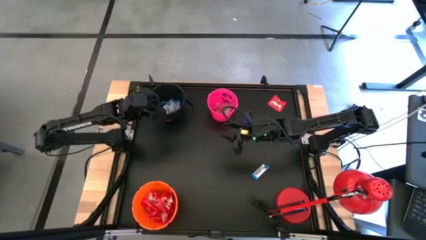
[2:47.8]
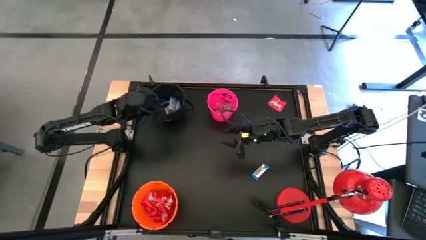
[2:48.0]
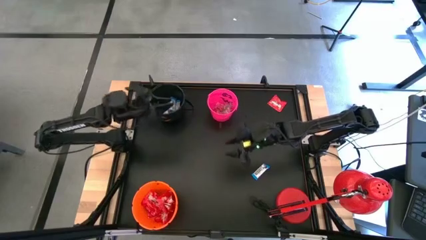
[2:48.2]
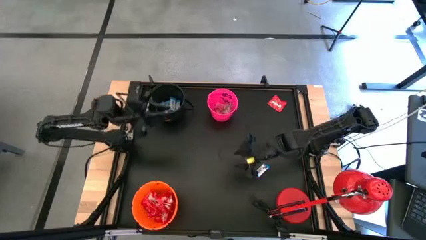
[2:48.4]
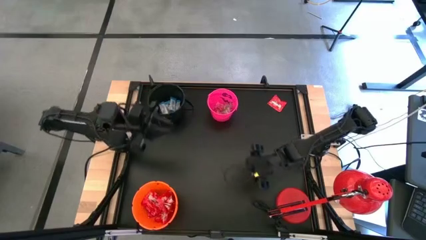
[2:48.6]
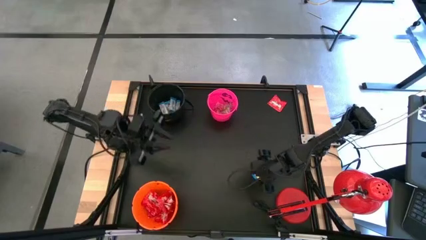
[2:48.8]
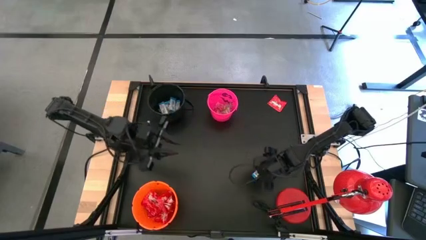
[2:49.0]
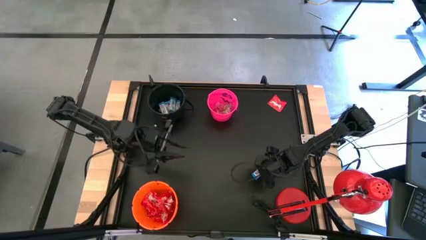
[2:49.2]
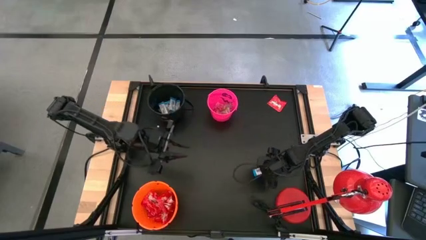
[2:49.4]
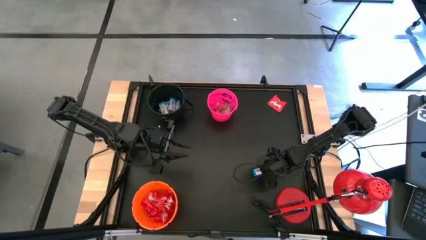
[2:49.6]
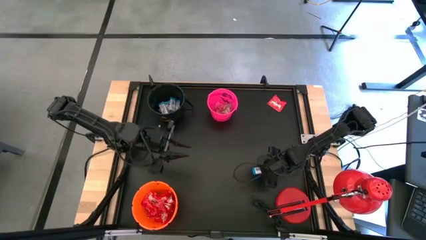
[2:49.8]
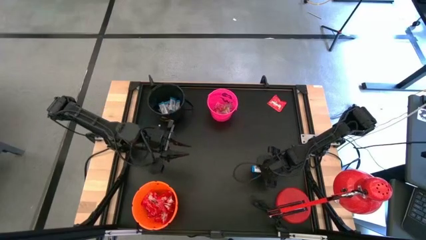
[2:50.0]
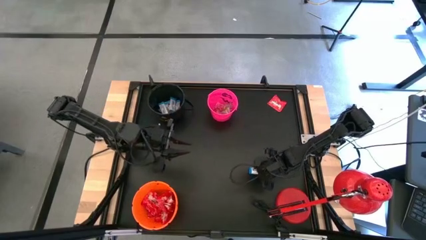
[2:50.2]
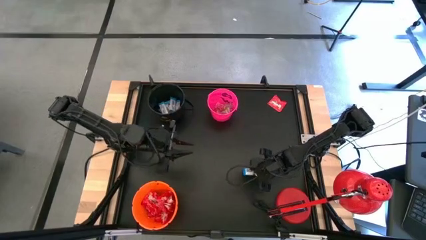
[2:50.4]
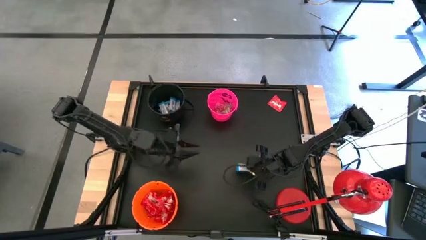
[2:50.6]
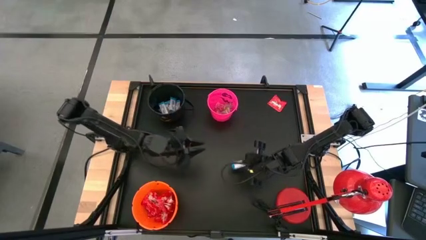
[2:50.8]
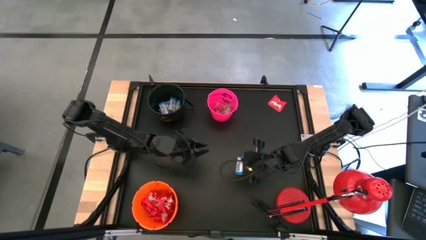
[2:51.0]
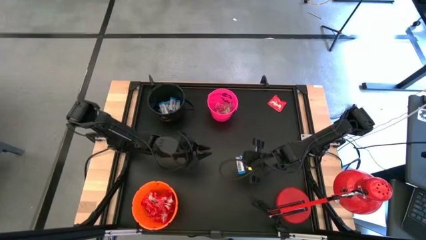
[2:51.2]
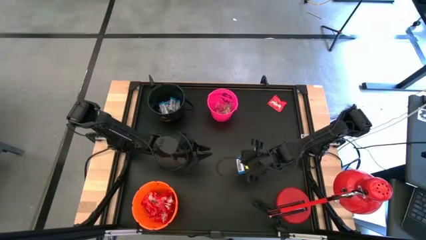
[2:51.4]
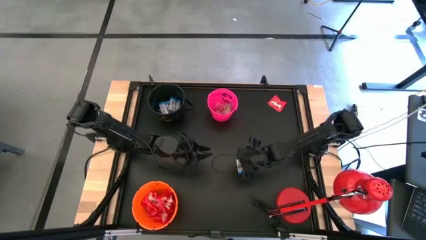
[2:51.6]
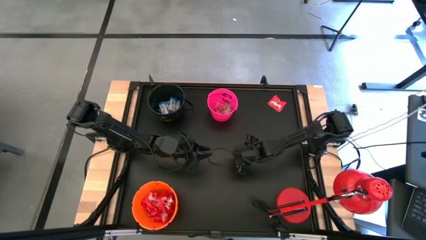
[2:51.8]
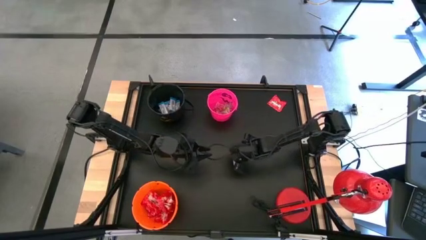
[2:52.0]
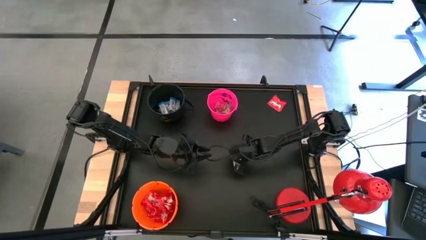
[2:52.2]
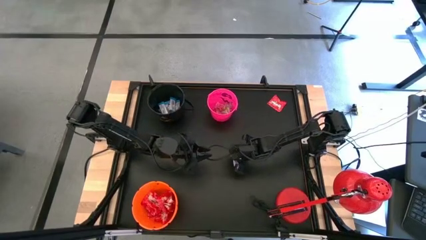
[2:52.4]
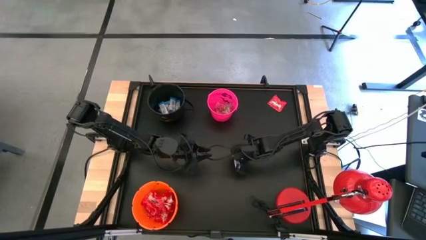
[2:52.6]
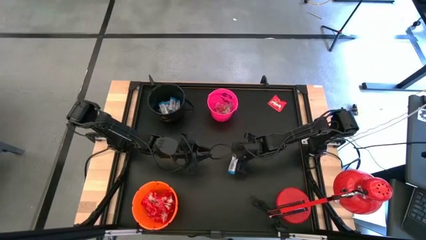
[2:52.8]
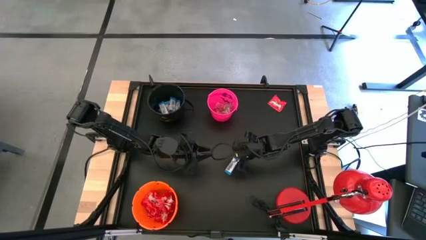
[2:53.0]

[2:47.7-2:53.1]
Task: Organize candy in baskets
Put the white chocolate bar into the black bucket

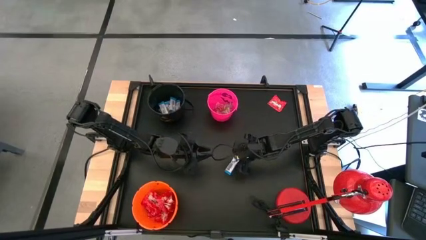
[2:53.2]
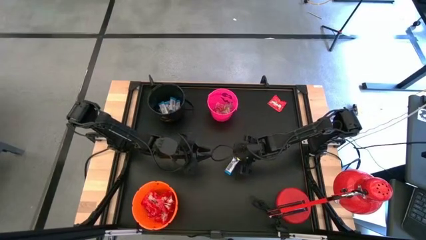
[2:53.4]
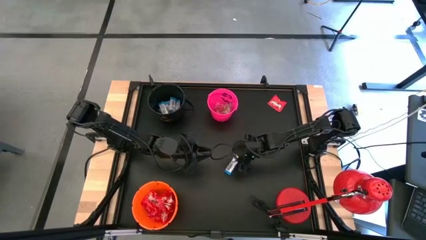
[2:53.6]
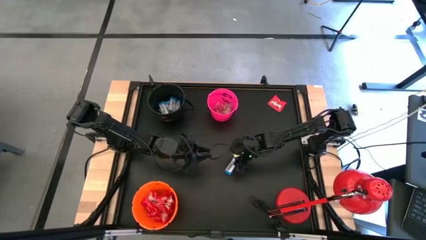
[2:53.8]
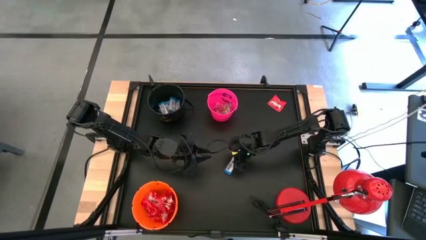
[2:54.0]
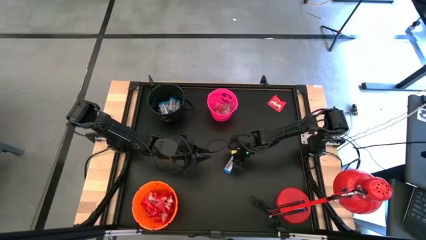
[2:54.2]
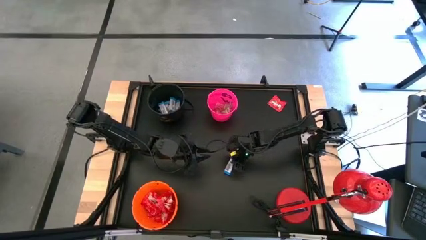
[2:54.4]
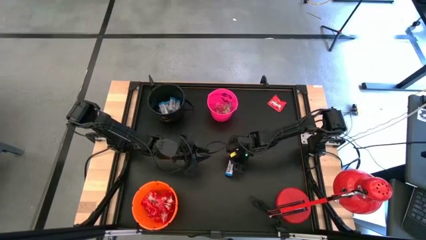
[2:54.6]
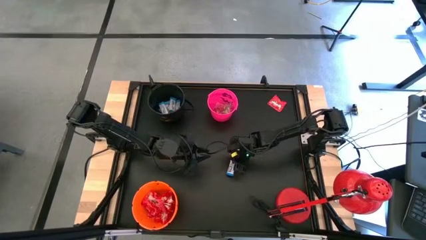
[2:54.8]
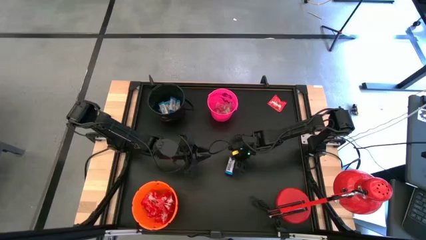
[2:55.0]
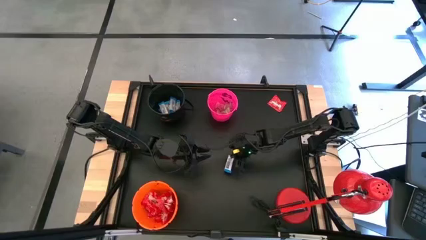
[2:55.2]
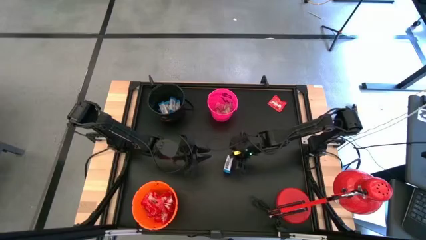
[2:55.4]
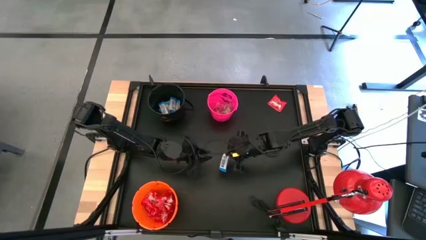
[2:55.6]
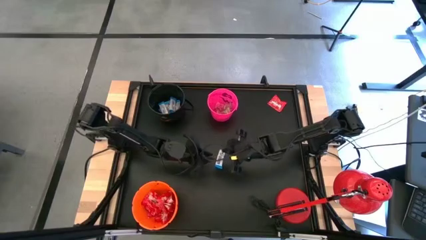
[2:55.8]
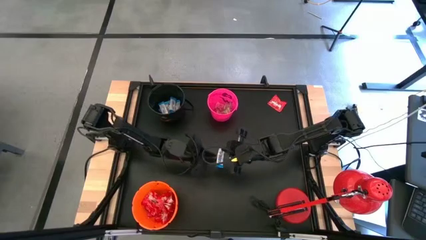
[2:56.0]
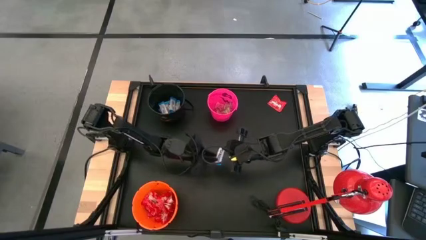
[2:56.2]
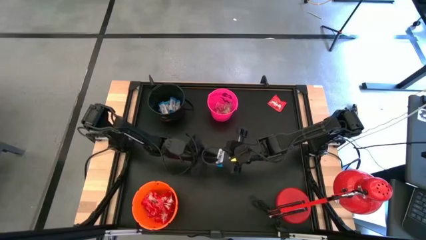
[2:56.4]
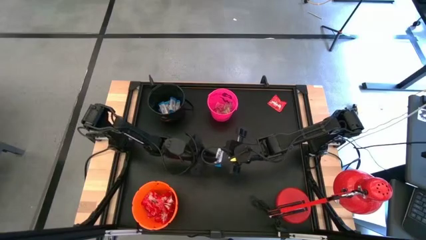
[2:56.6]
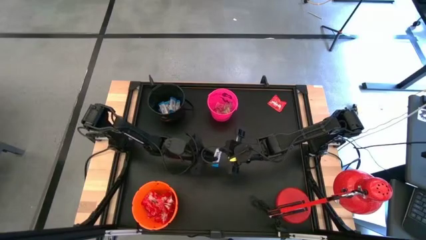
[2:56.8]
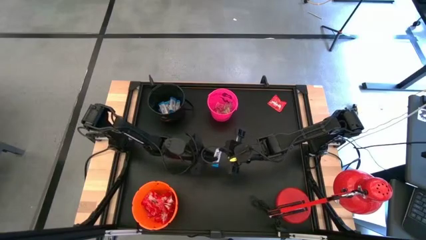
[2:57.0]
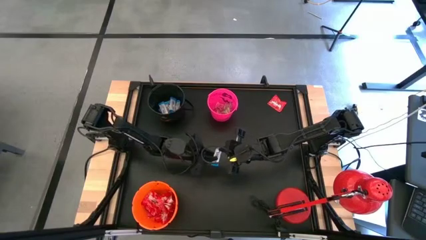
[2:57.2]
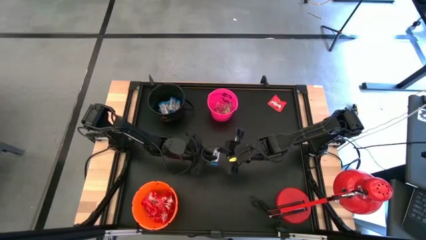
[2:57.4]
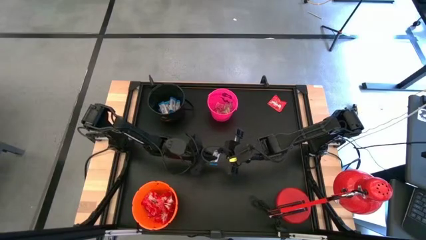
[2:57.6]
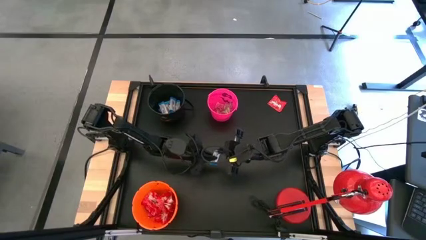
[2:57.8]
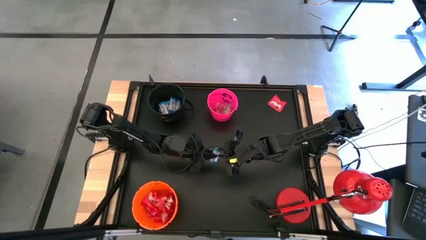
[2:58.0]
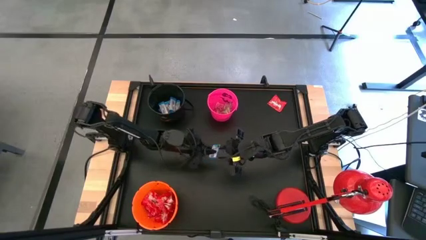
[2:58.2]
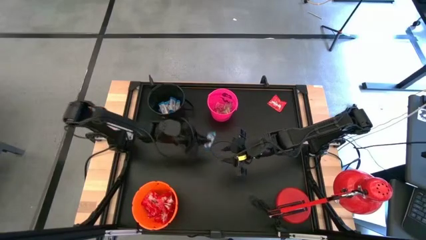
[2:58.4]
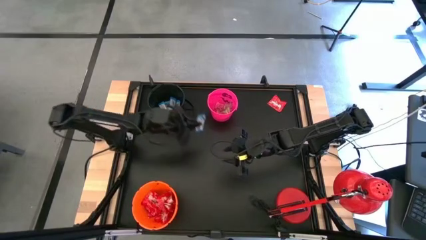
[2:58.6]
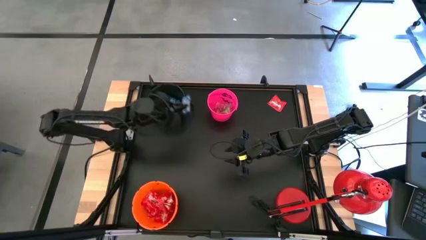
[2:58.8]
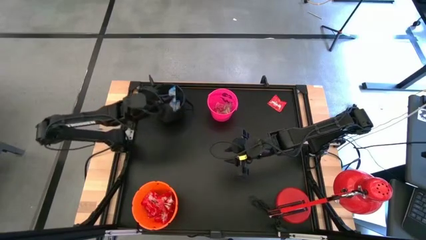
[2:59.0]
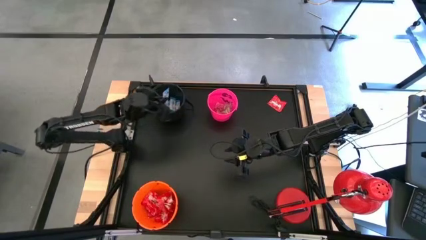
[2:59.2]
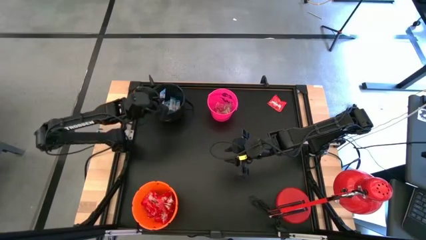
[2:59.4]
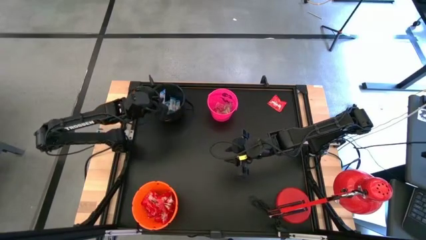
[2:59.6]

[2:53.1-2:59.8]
Put the white chocolate bar into the black bucket
